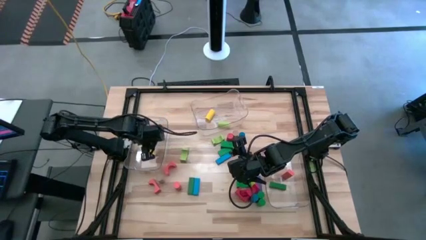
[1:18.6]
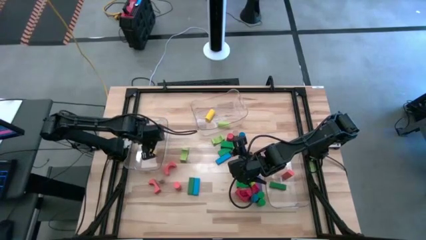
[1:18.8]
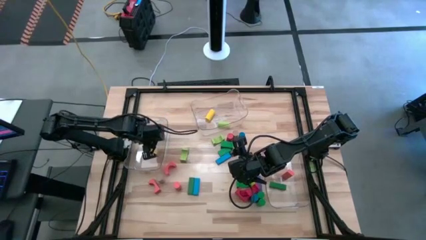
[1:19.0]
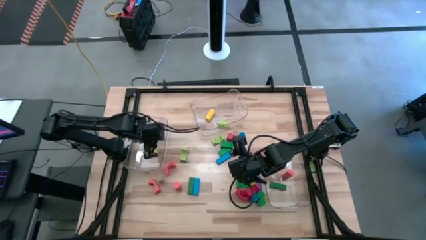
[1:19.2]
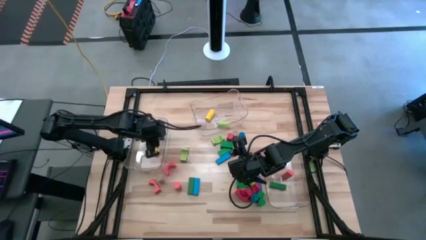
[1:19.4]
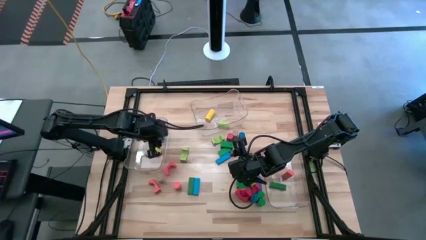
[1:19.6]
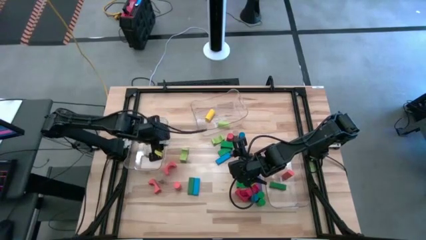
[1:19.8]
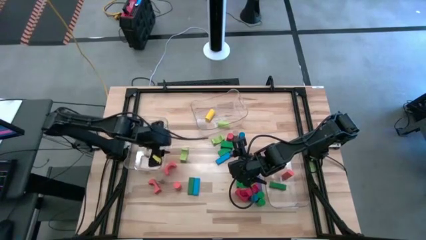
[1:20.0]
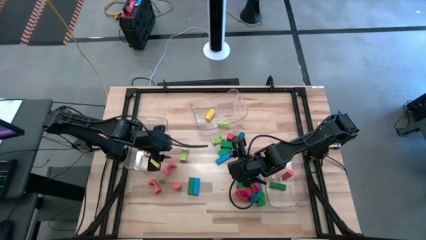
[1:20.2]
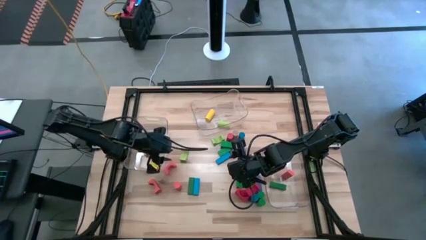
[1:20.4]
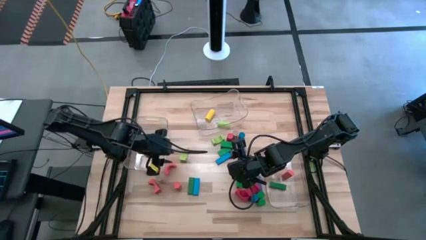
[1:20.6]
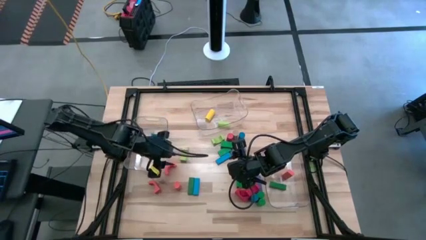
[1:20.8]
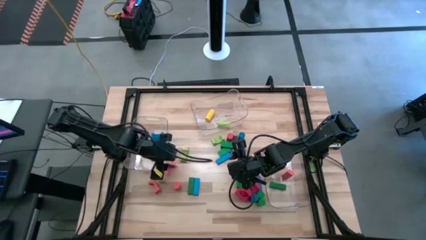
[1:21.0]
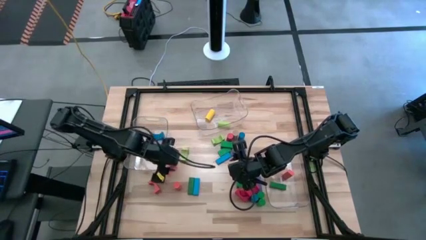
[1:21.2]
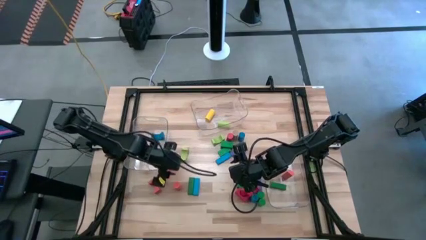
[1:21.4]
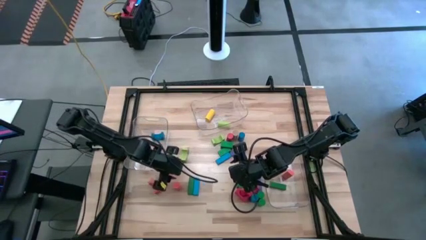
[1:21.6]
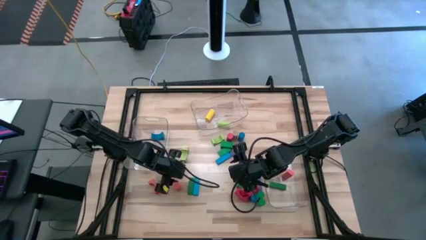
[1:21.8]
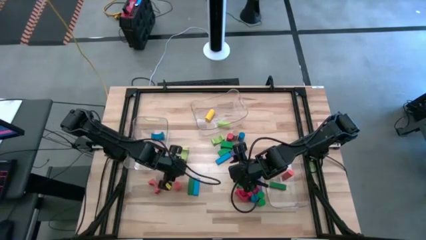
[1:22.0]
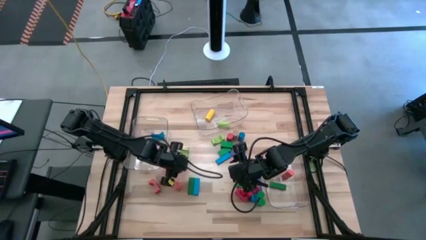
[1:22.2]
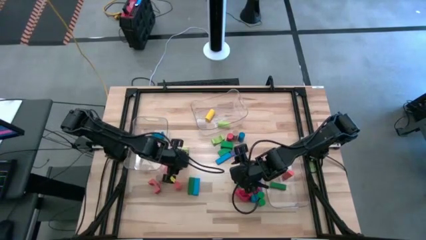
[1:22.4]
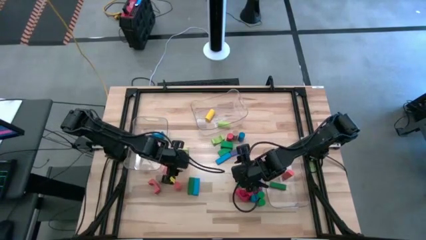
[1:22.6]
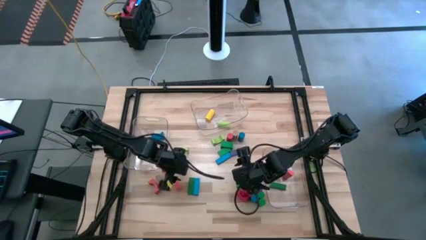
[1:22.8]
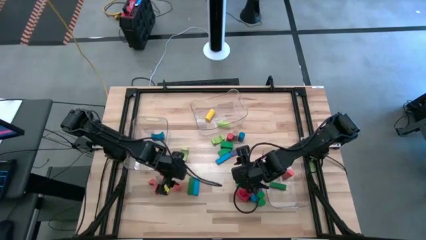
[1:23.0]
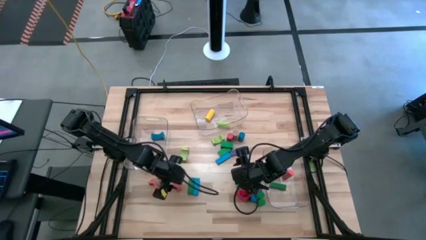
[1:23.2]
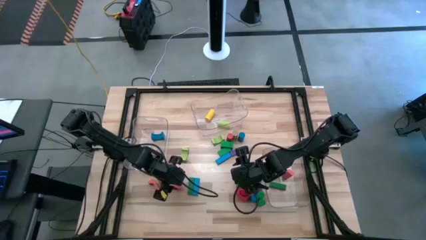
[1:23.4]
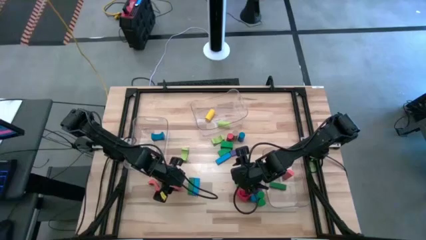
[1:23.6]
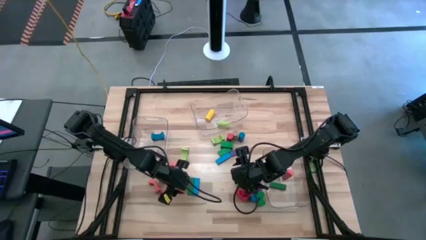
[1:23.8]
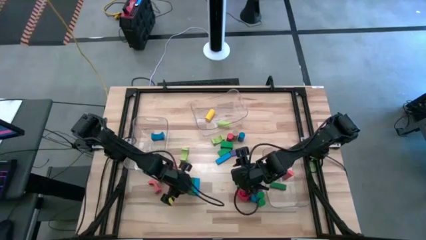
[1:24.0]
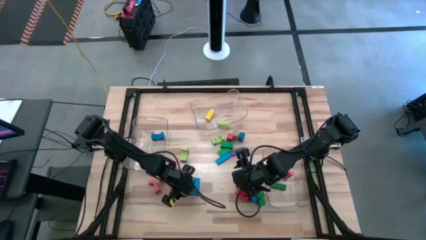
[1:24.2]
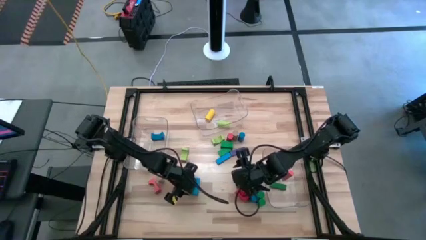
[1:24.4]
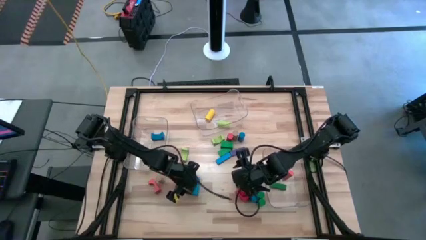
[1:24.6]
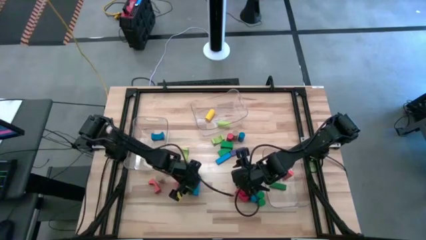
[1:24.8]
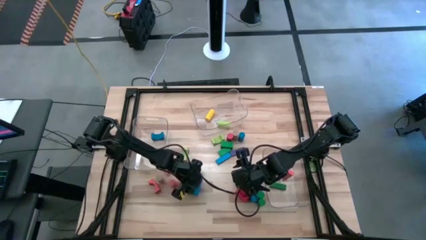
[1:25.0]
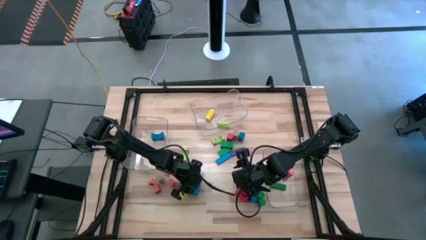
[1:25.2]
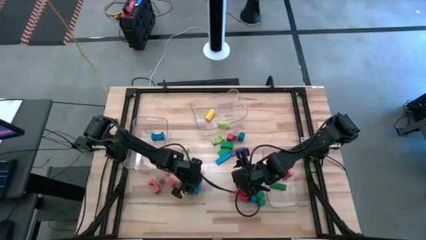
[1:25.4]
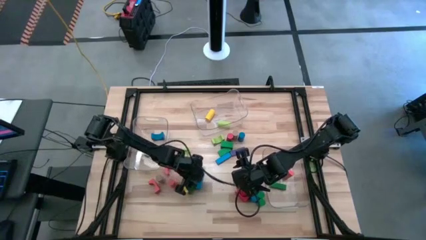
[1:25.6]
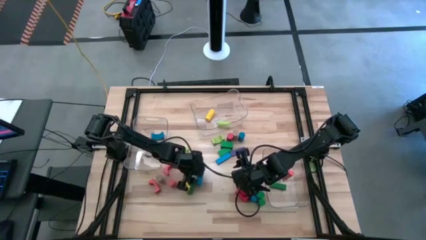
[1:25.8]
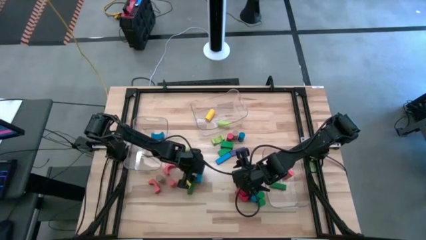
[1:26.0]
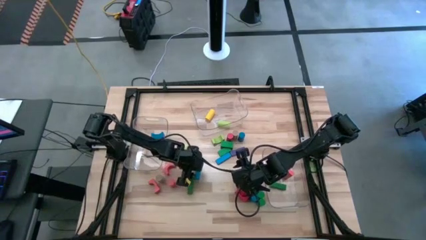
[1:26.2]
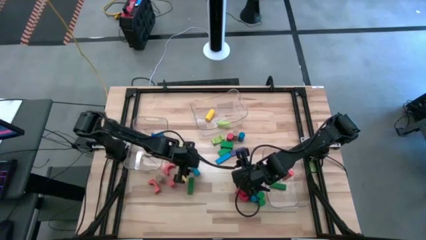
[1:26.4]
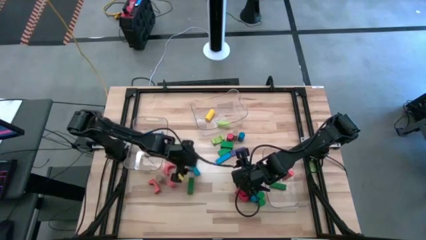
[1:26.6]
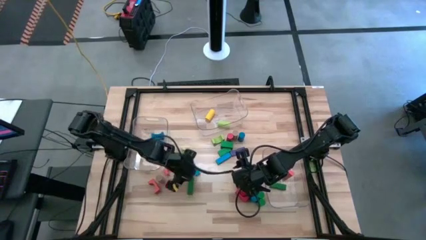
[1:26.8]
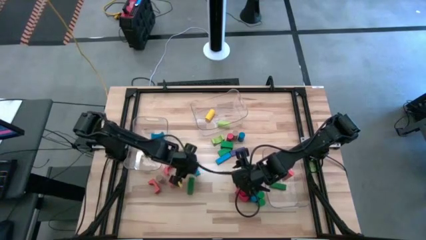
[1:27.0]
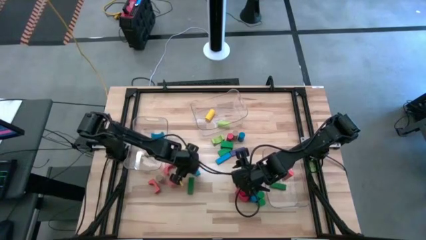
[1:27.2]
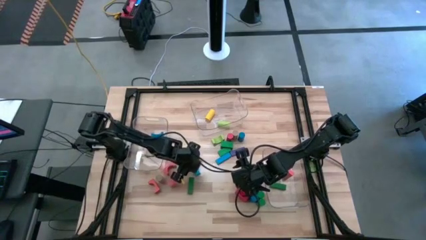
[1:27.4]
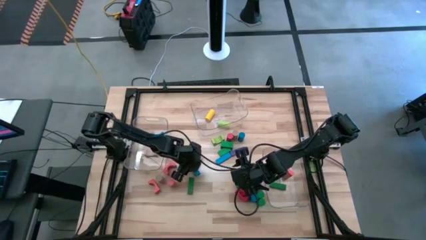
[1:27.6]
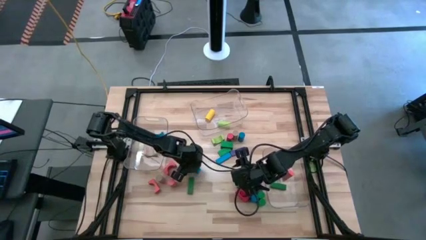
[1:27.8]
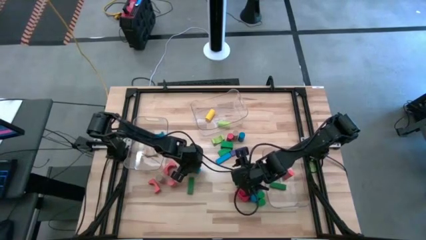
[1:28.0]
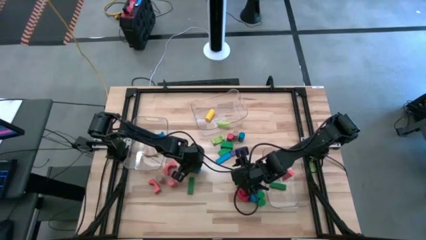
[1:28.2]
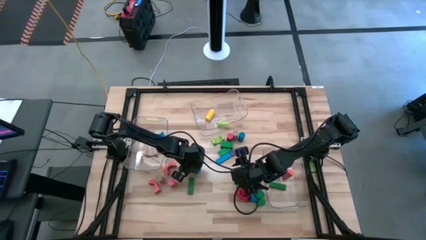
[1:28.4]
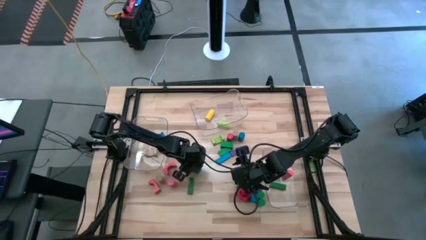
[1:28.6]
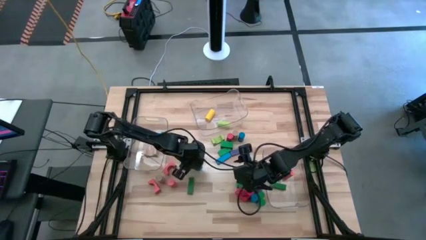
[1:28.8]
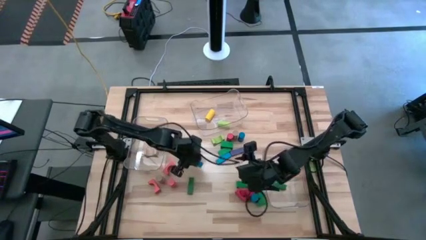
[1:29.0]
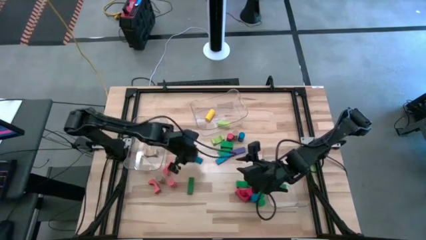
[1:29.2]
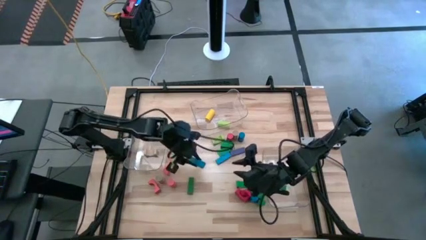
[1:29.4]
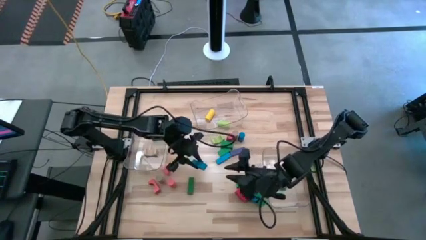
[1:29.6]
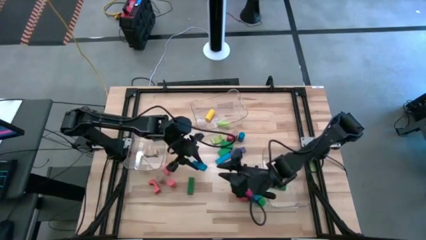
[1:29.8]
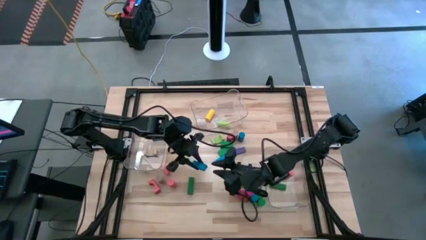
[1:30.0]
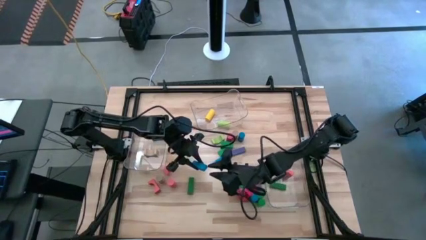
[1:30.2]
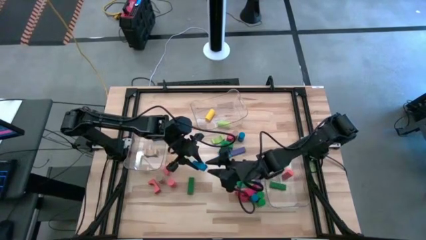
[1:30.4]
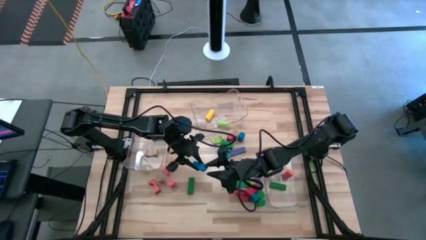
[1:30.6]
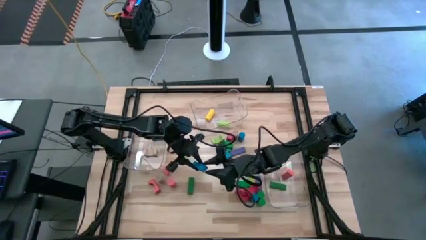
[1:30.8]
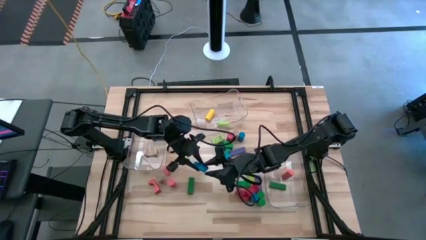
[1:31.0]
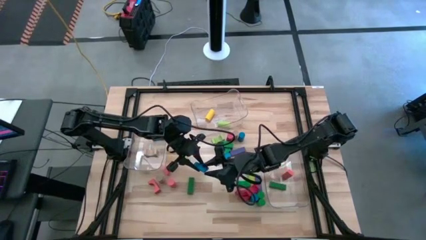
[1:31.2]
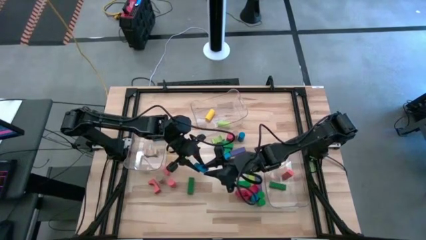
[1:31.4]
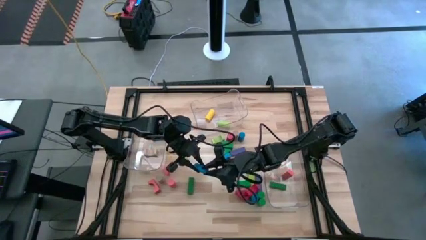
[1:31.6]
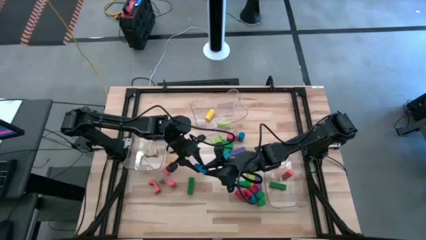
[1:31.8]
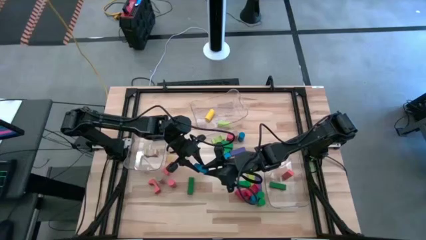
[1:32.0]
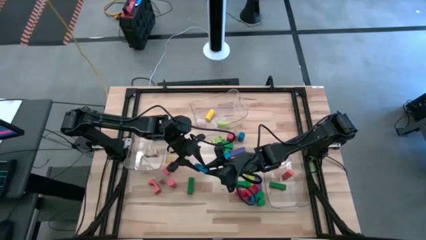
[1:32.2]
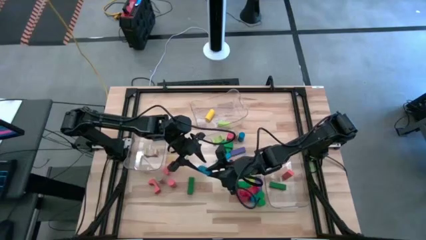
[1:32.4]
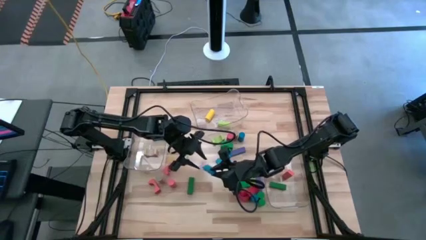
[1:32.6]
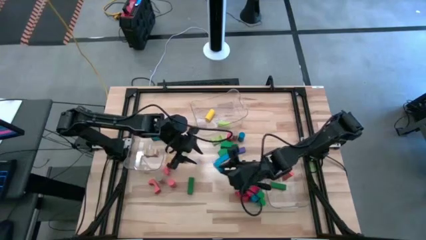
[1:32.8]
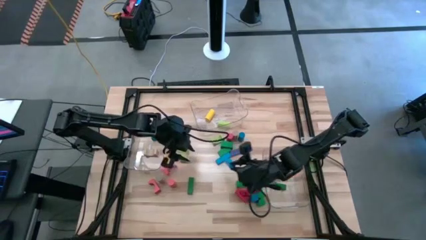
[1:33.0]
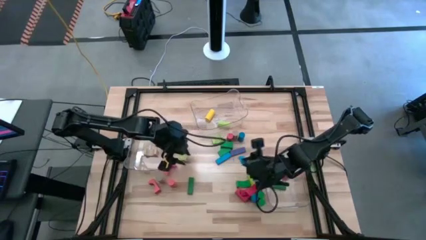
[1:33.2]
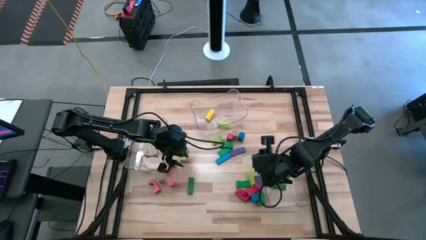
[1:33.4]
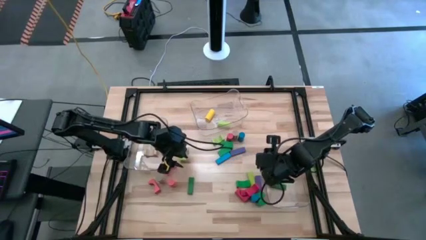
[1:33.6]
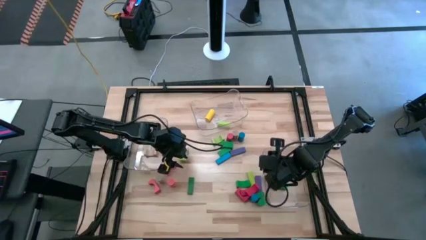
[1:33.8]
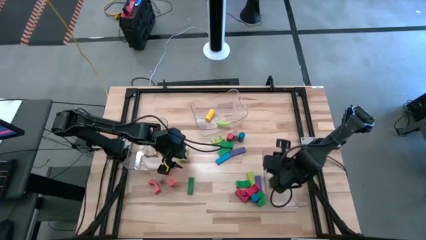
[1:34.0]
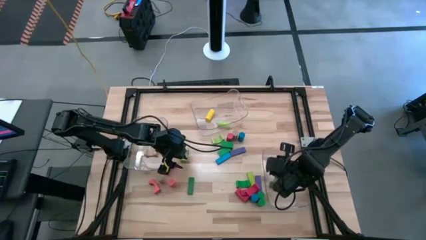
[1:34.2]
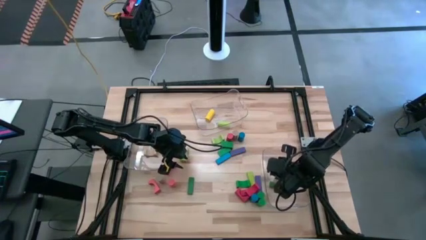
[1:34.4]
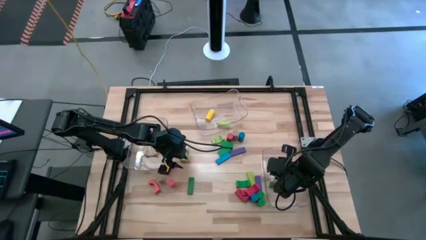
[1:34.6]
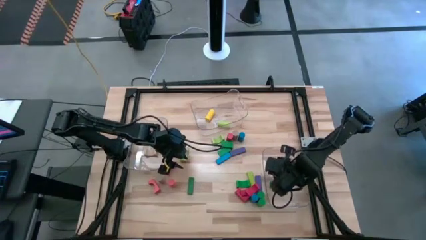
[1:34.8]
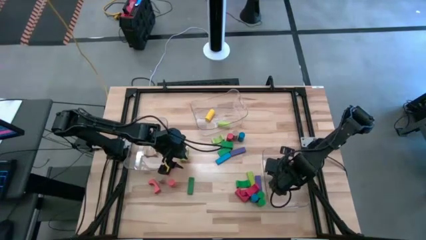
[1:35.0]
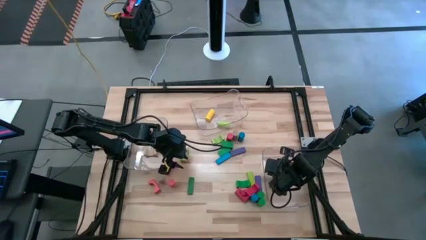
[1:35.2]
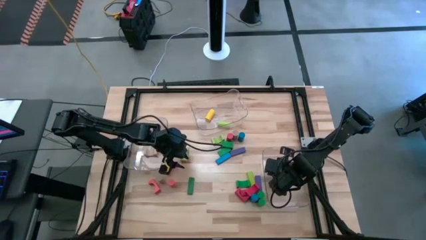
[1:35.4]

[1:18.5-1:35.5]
Task: Sort blocks by size
Put the blue rectangular block into the right transparent bin
